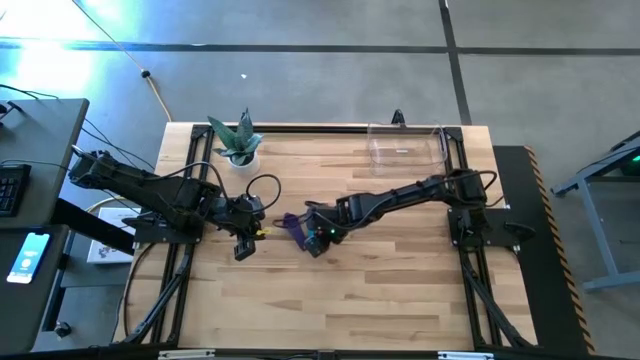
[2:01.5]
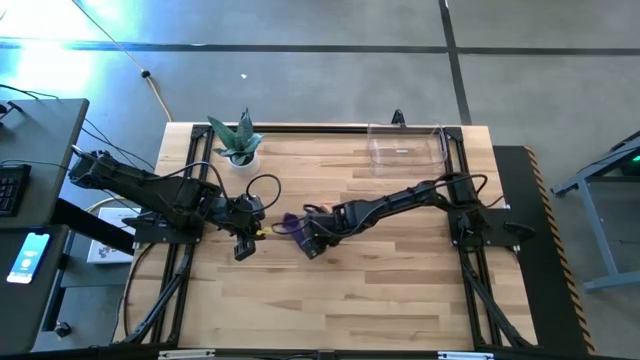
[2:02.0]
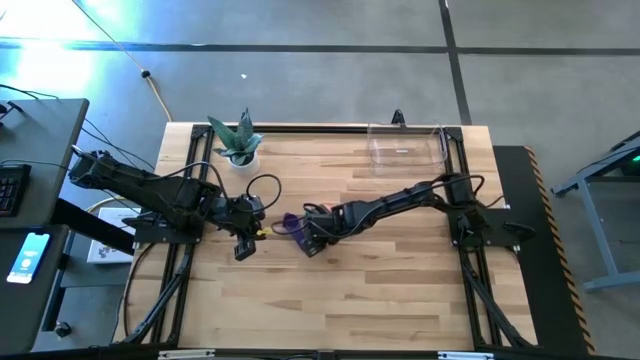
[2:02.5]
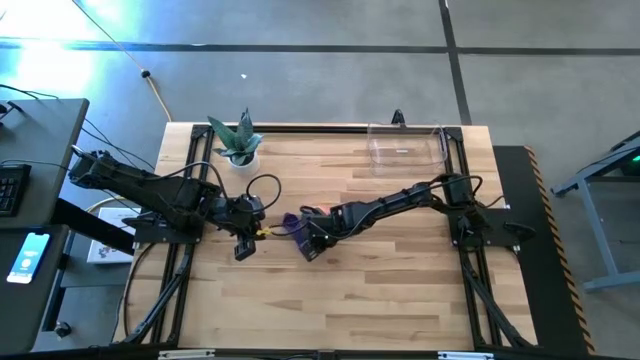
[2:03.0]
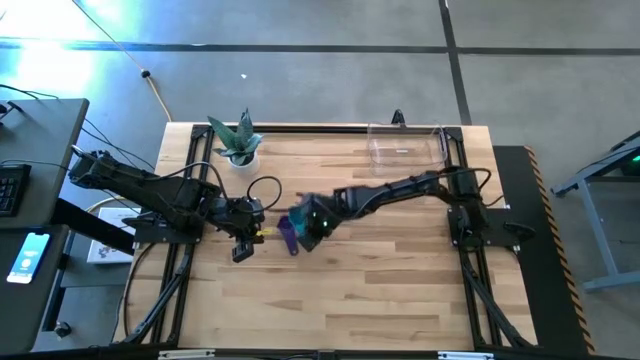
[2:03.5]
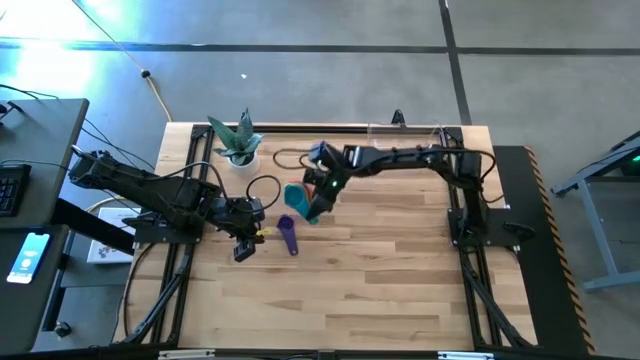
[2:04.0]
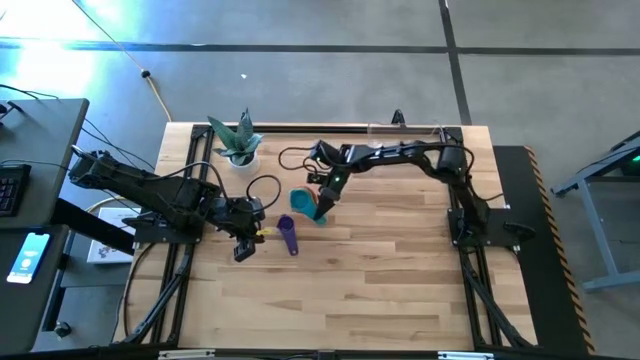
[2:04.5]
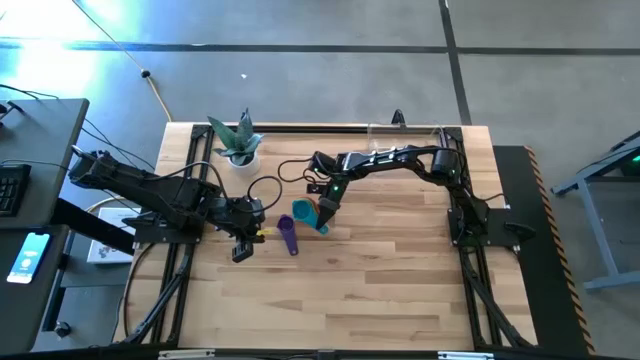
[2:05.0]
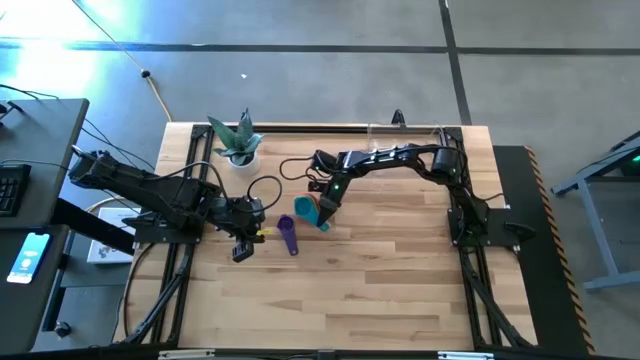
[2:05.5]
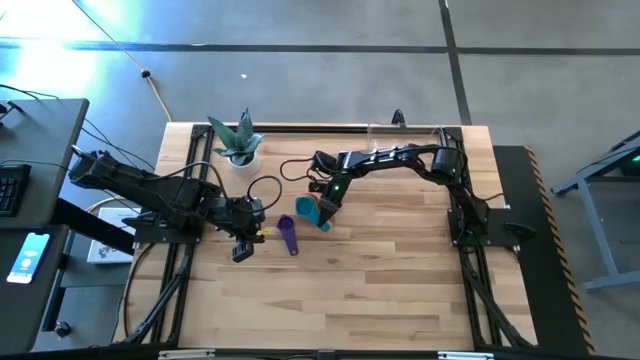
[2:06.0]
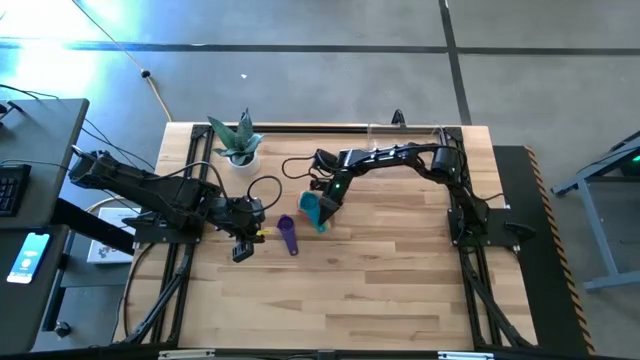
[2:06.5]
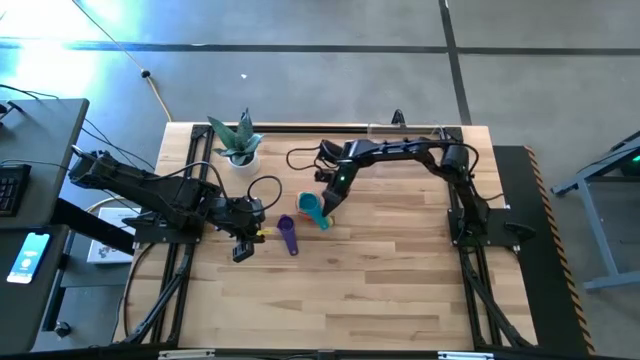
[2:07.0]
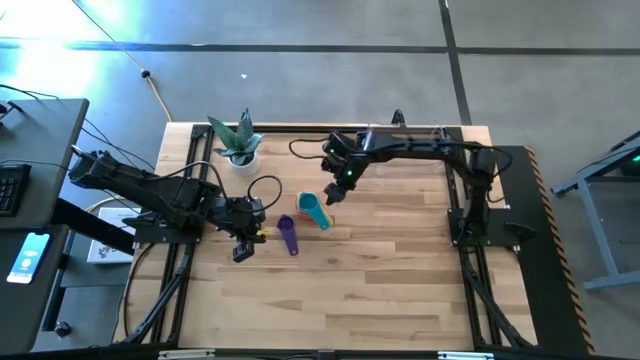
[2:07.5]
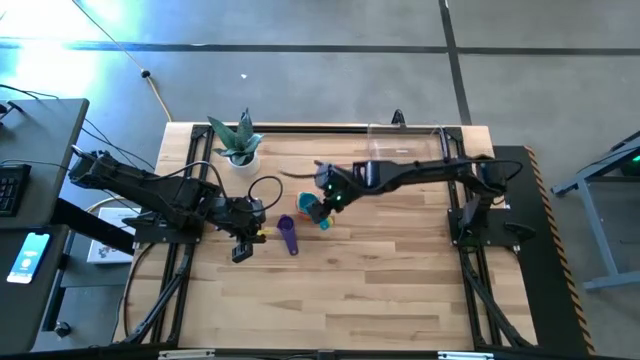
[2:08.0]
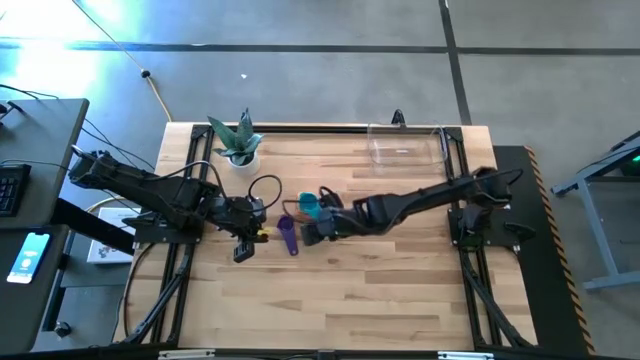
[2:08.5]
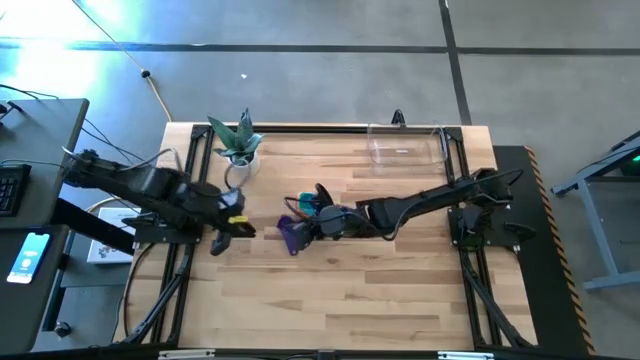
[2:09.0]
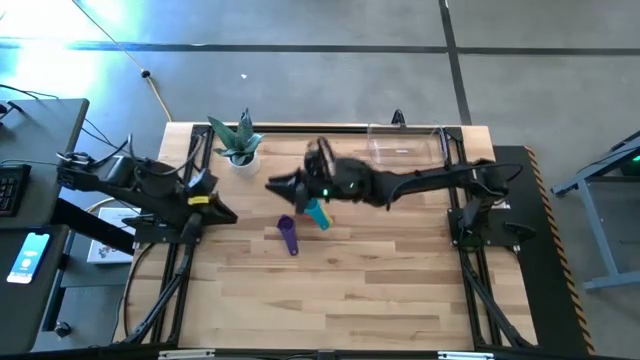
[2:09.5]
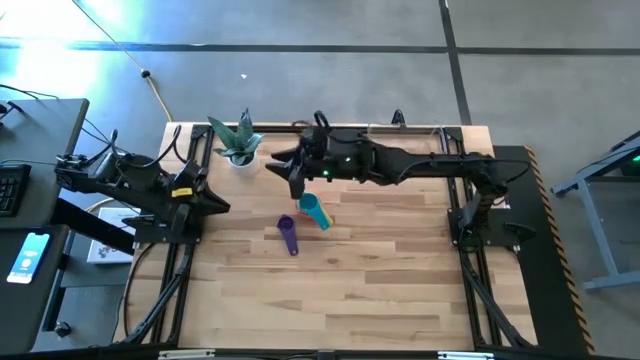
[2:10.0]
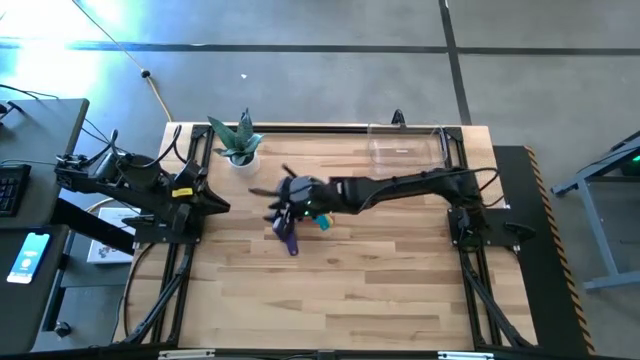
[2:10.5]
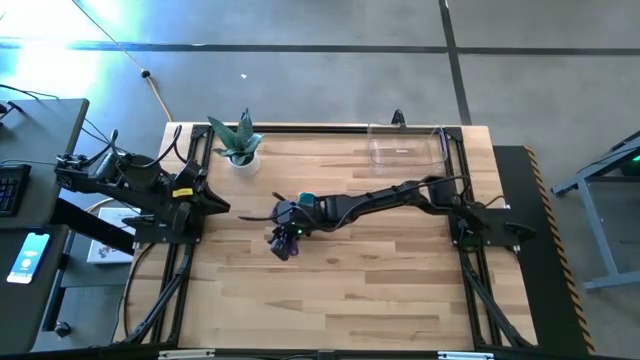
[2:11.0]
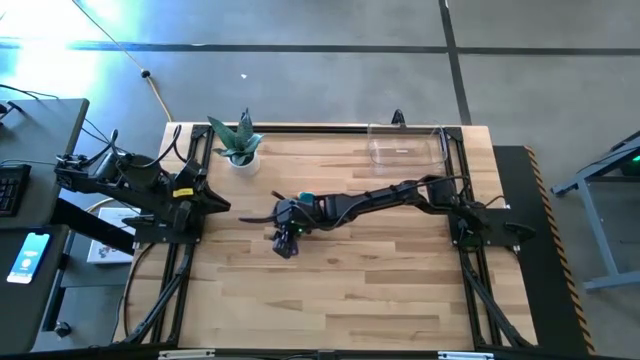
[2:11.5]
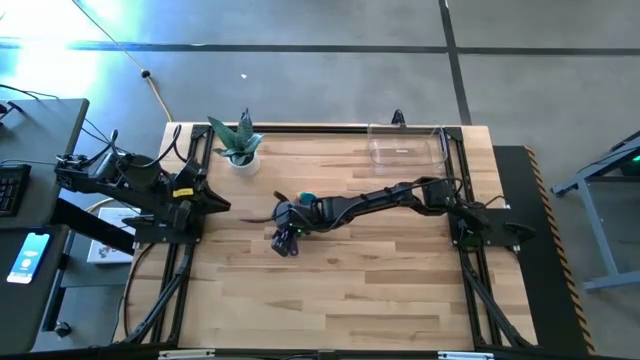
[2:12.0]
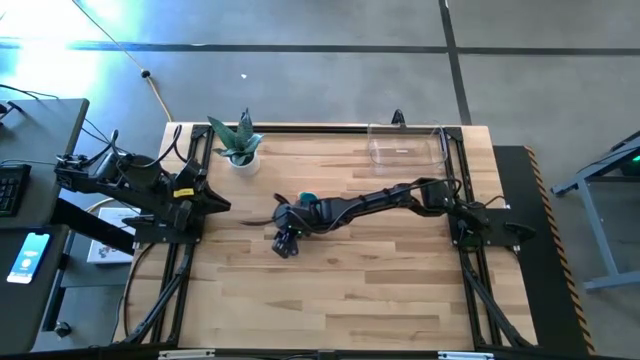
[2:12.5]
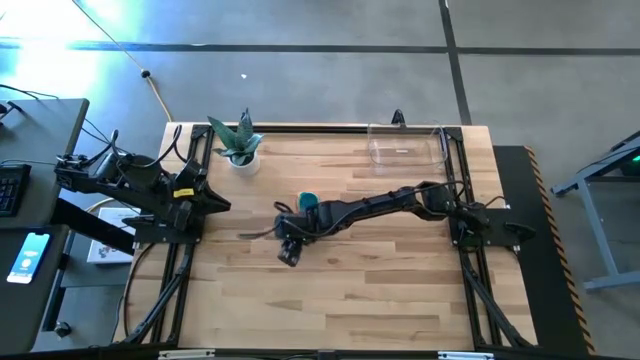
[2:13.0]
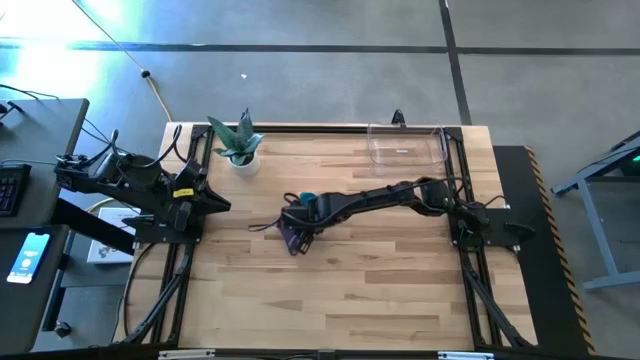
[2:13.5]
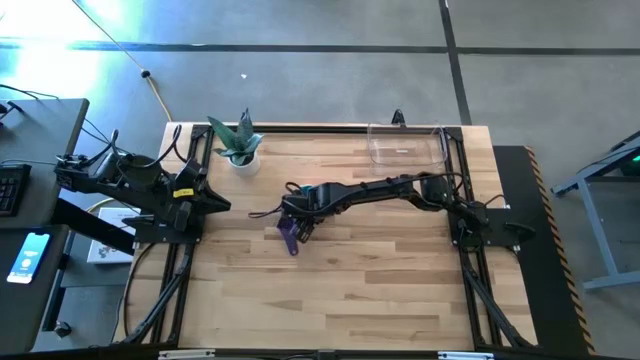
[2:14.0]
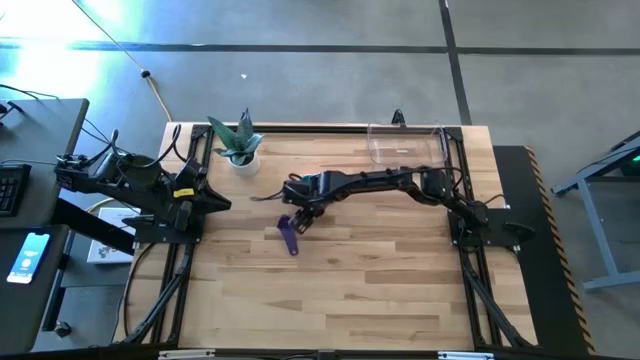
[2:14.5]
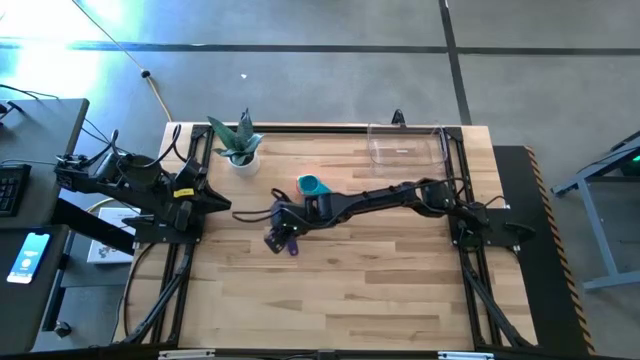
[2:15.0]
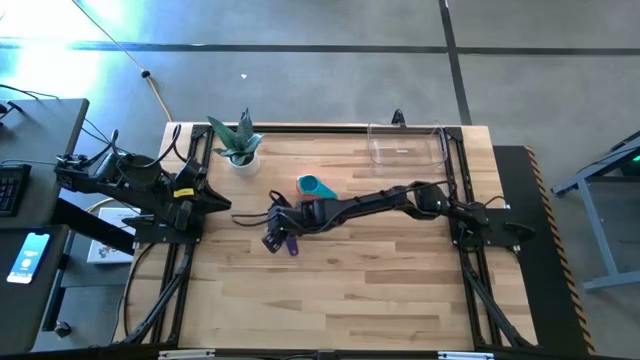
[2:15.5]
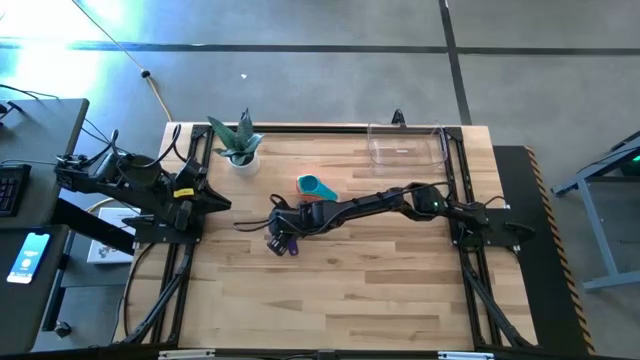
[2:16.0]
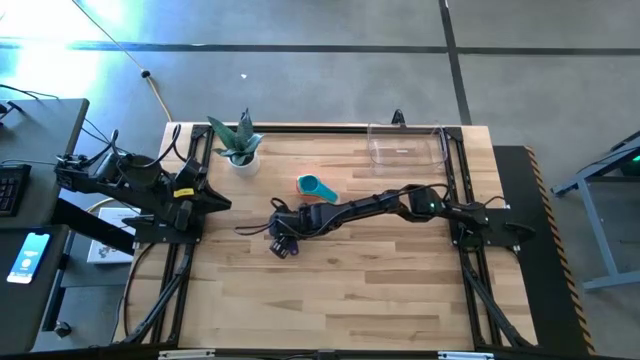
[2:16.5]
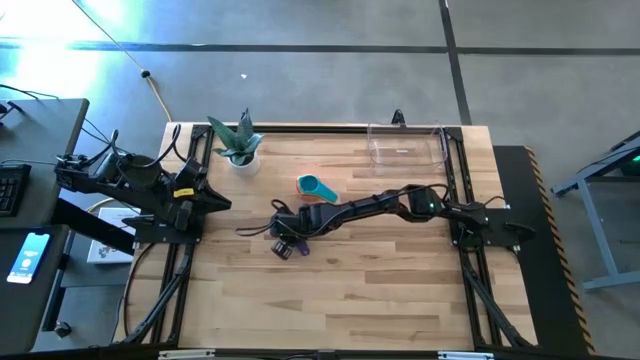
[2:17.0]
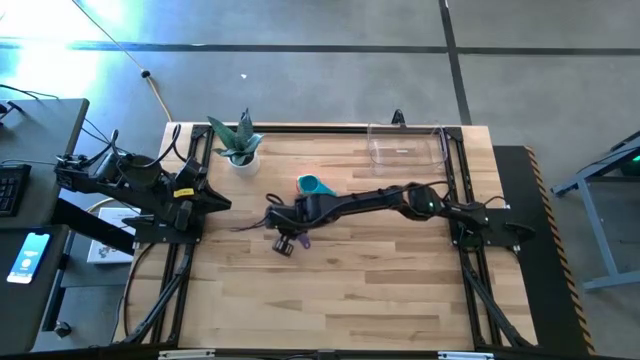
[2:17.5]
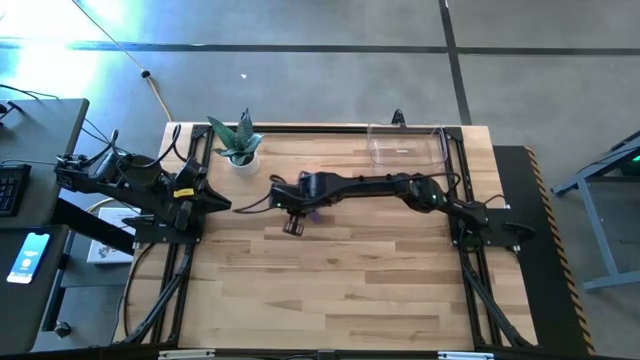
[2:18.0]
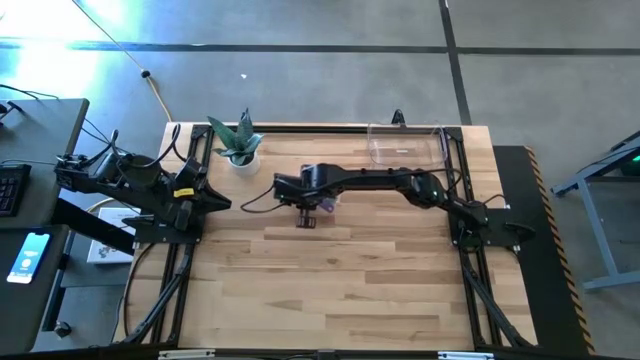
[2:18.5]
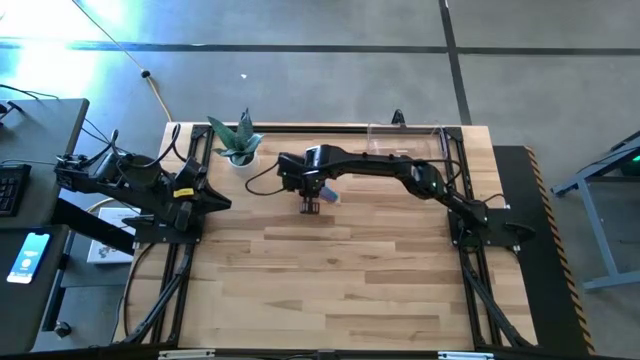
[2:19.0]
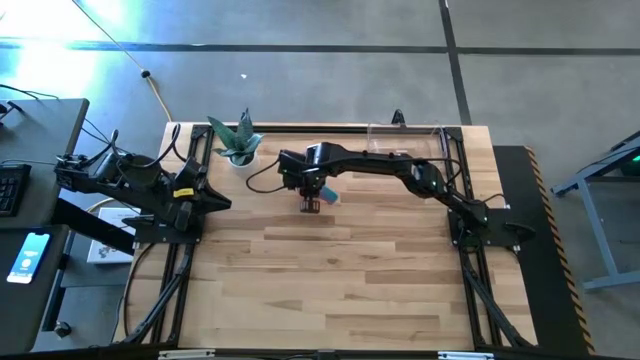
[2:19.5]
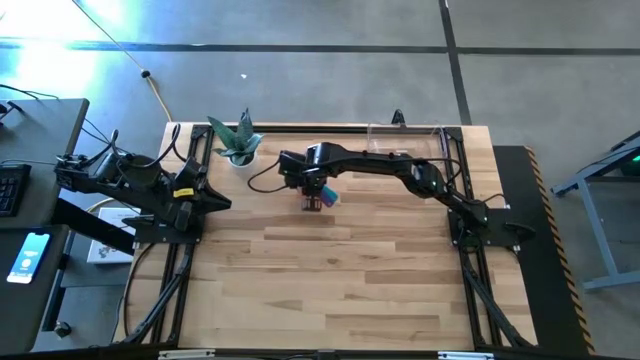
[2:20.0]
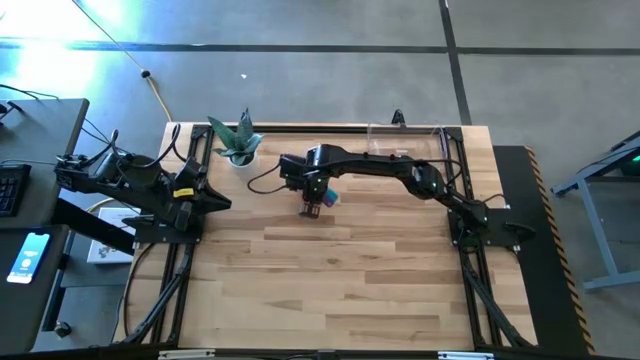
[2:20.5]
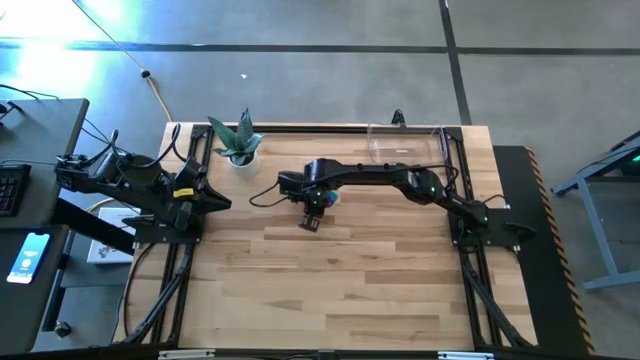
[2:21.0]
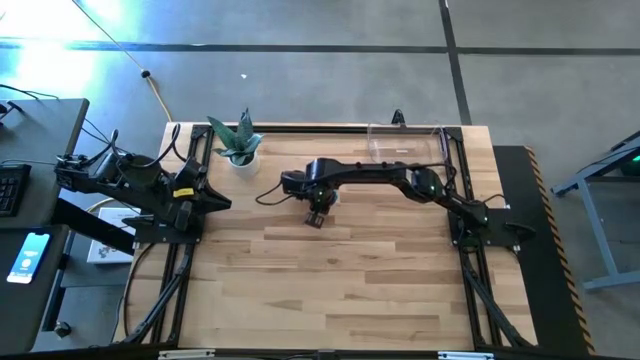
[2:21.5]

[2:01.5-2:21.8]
Task: Nest measuring cups in basket
Stack the violet measuring cup into the blue measuring cup
